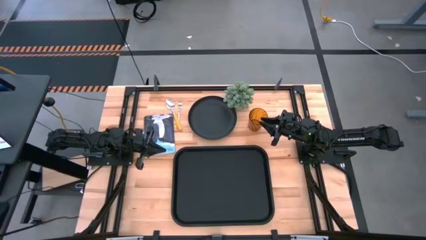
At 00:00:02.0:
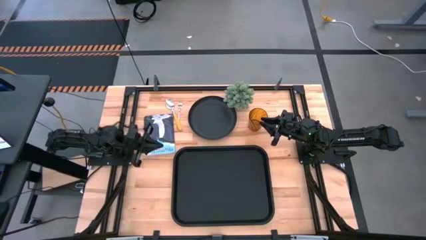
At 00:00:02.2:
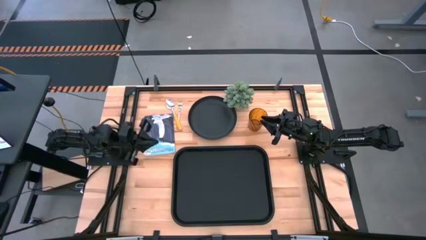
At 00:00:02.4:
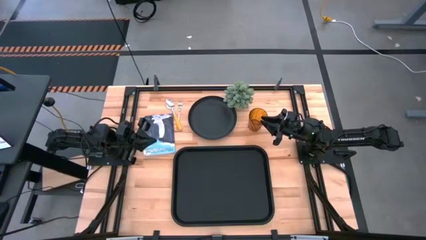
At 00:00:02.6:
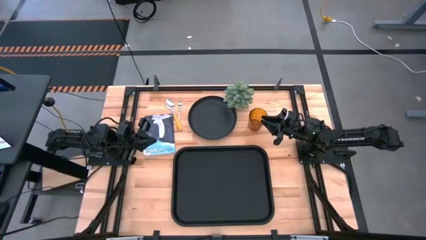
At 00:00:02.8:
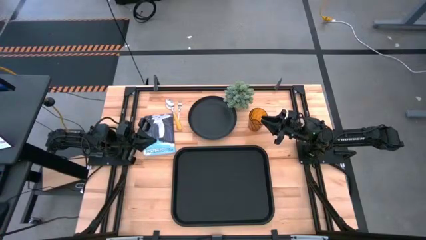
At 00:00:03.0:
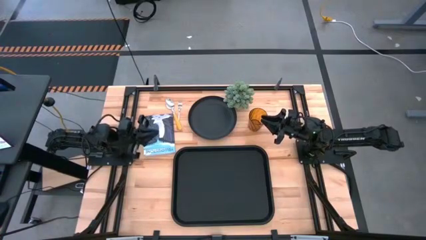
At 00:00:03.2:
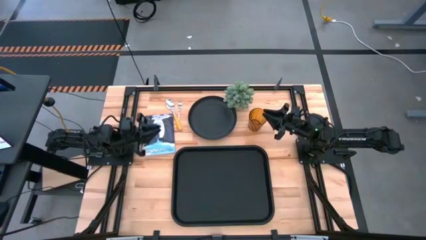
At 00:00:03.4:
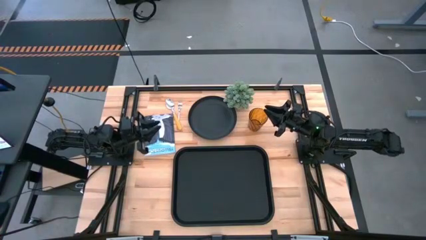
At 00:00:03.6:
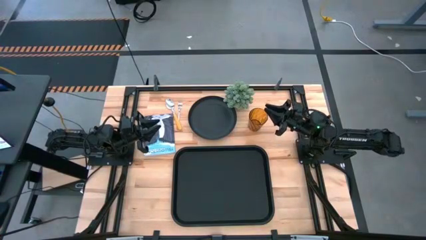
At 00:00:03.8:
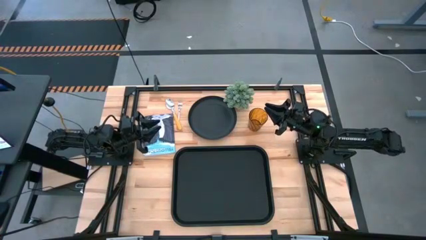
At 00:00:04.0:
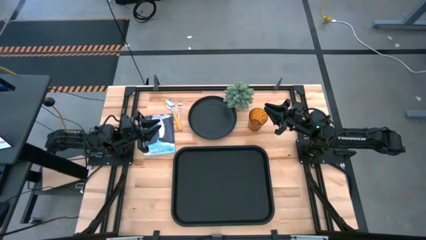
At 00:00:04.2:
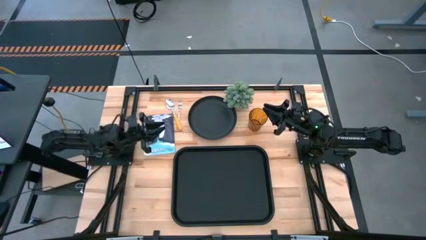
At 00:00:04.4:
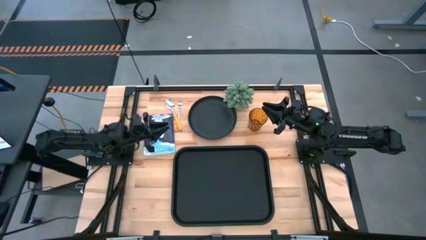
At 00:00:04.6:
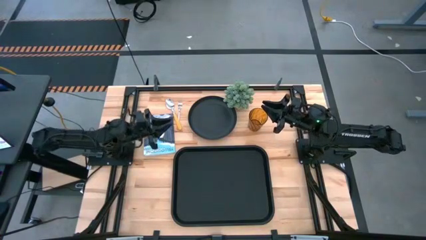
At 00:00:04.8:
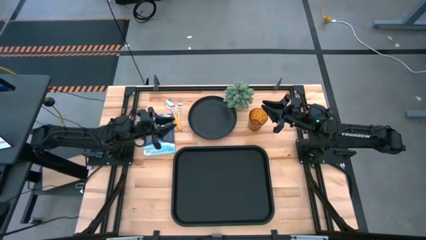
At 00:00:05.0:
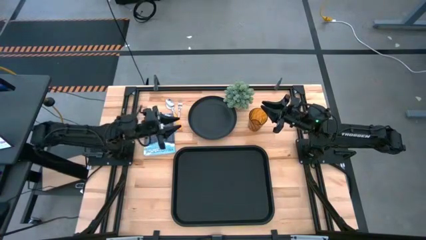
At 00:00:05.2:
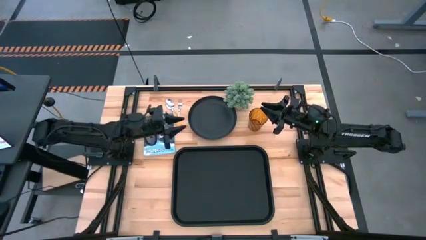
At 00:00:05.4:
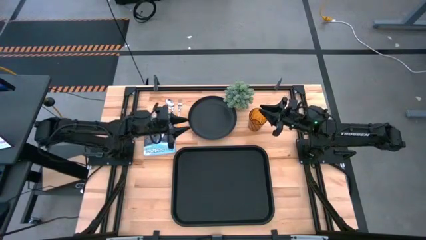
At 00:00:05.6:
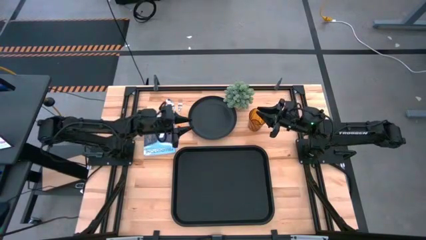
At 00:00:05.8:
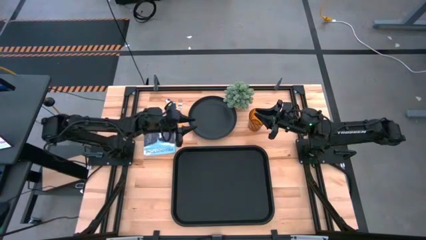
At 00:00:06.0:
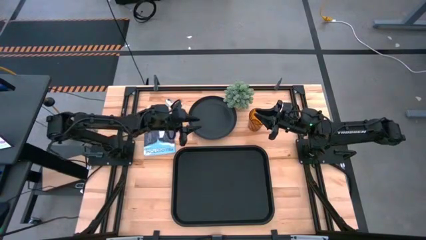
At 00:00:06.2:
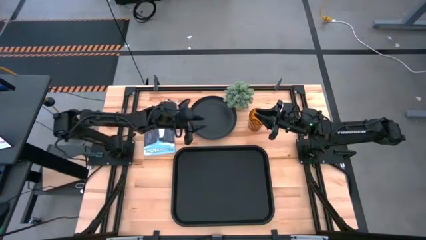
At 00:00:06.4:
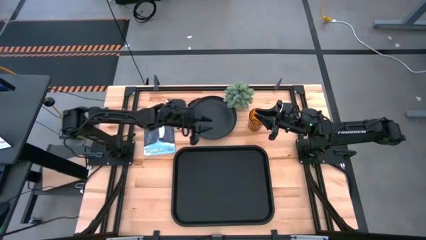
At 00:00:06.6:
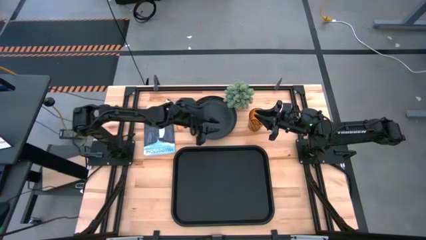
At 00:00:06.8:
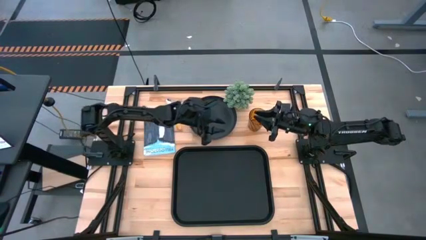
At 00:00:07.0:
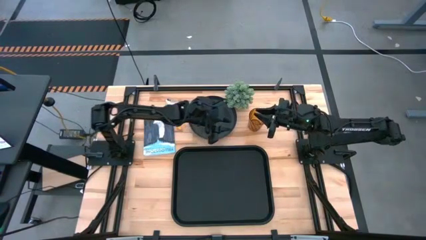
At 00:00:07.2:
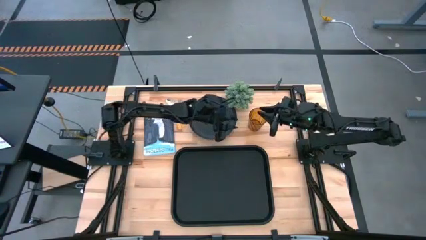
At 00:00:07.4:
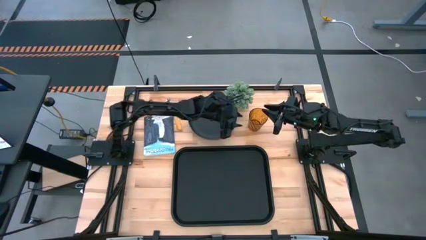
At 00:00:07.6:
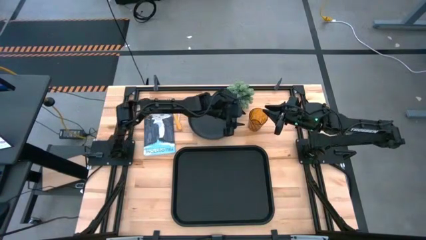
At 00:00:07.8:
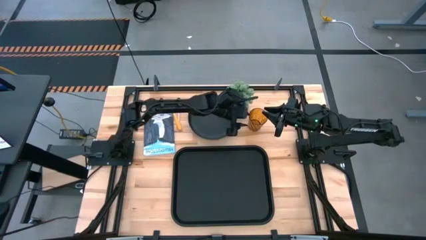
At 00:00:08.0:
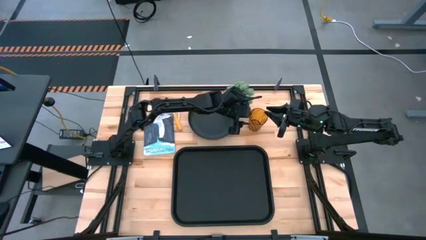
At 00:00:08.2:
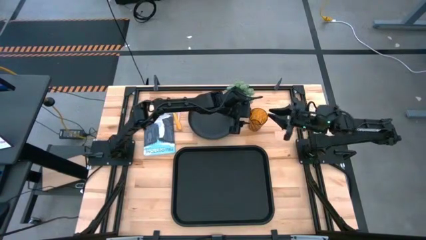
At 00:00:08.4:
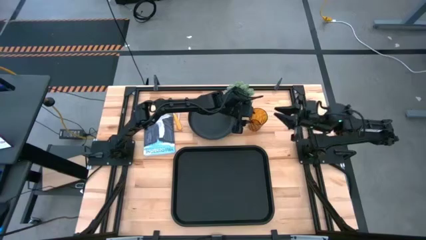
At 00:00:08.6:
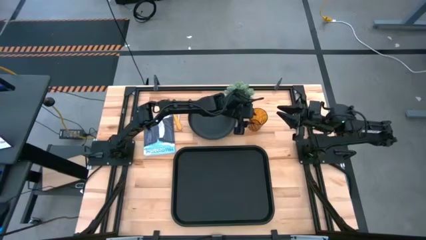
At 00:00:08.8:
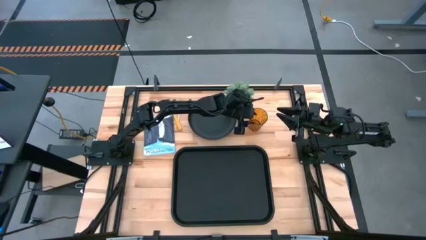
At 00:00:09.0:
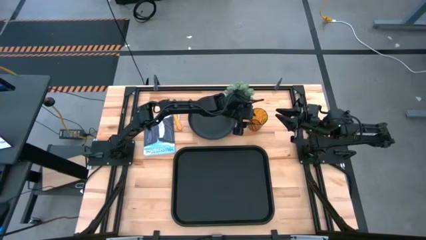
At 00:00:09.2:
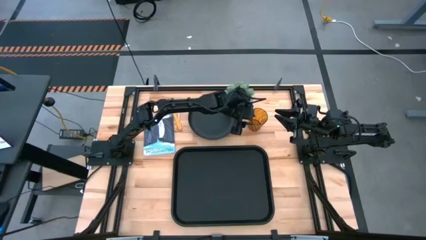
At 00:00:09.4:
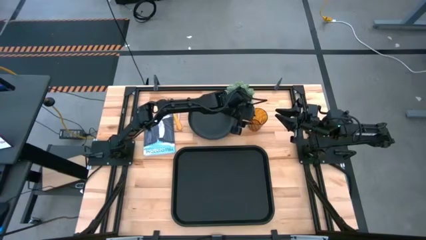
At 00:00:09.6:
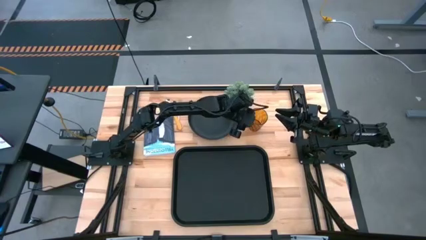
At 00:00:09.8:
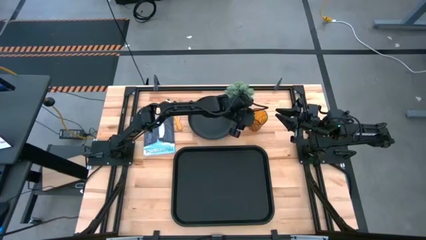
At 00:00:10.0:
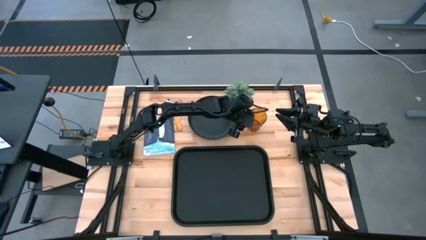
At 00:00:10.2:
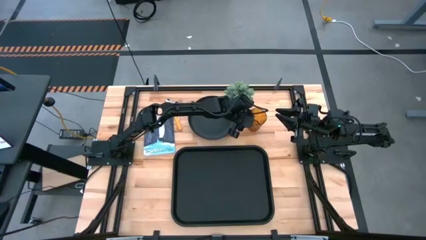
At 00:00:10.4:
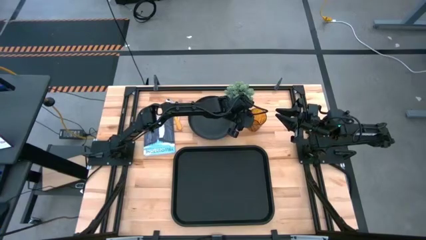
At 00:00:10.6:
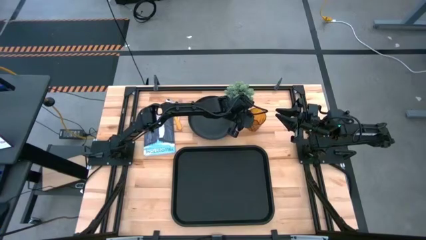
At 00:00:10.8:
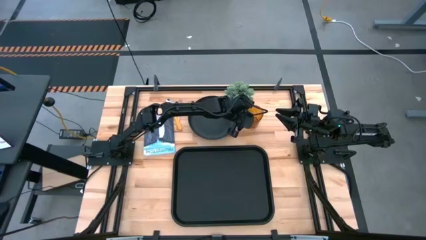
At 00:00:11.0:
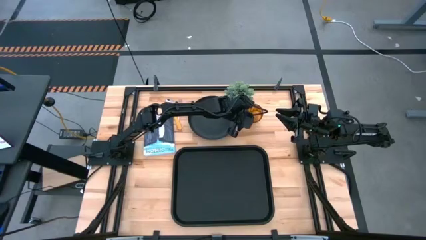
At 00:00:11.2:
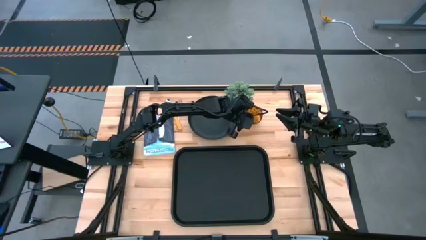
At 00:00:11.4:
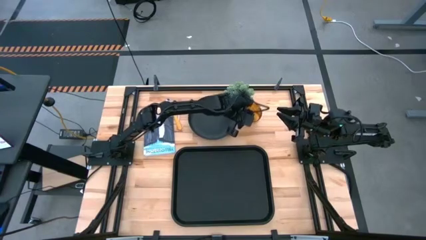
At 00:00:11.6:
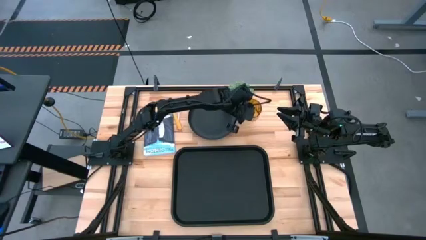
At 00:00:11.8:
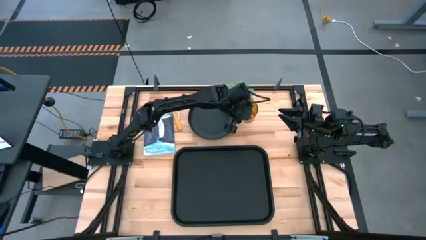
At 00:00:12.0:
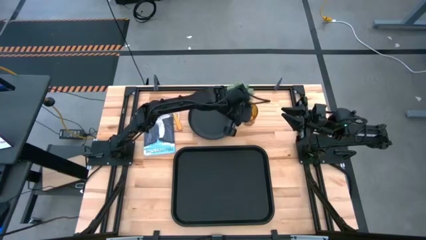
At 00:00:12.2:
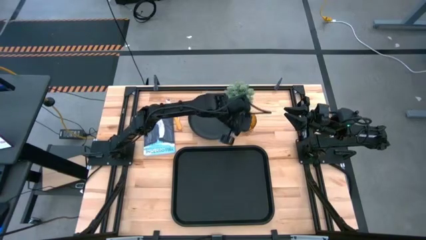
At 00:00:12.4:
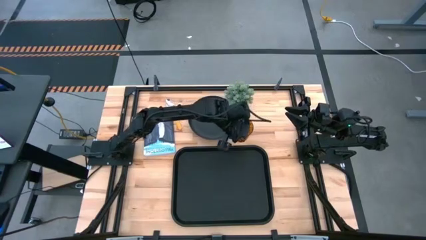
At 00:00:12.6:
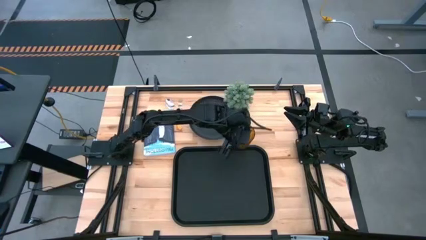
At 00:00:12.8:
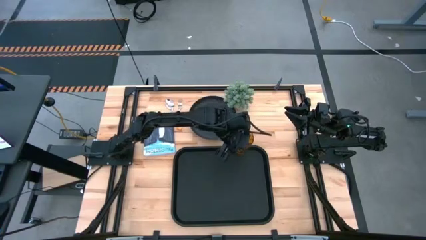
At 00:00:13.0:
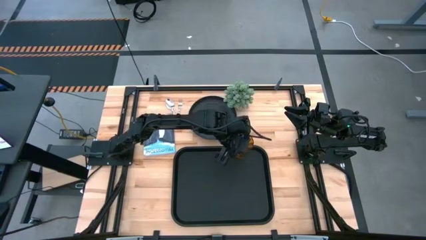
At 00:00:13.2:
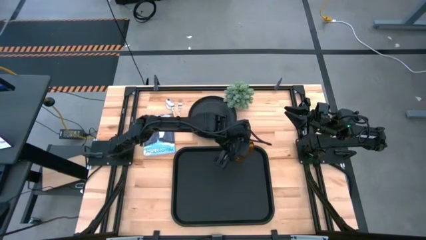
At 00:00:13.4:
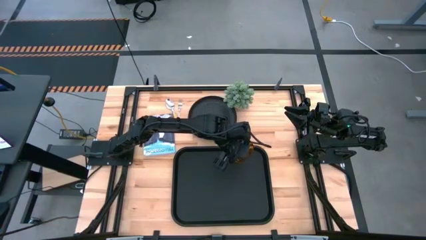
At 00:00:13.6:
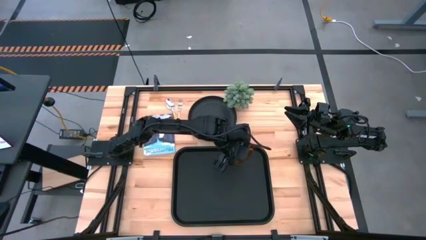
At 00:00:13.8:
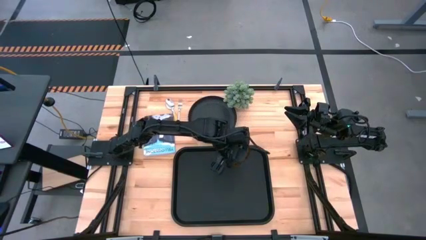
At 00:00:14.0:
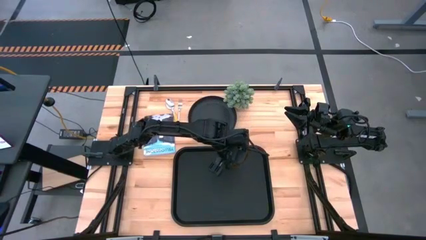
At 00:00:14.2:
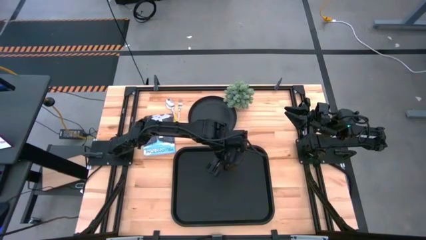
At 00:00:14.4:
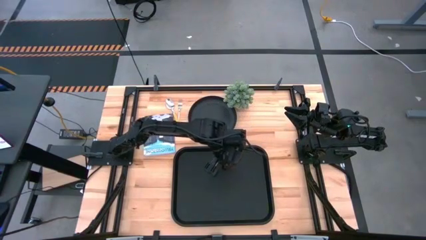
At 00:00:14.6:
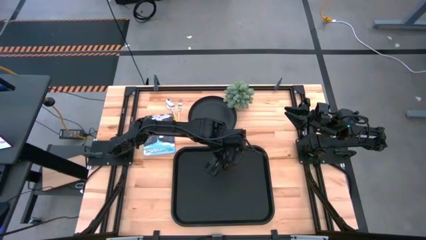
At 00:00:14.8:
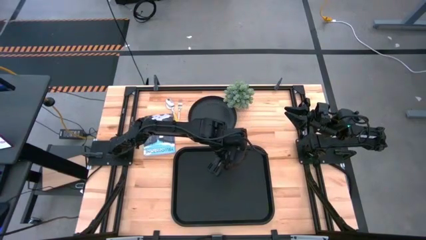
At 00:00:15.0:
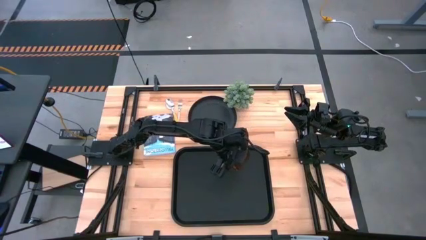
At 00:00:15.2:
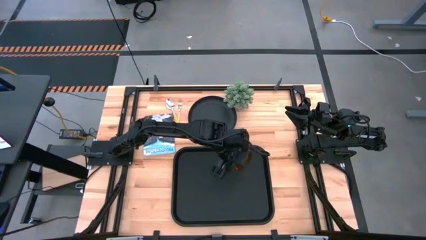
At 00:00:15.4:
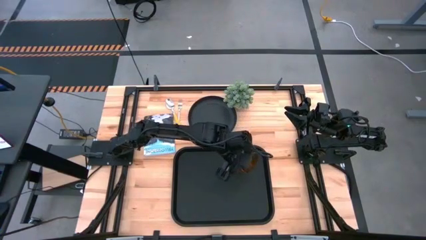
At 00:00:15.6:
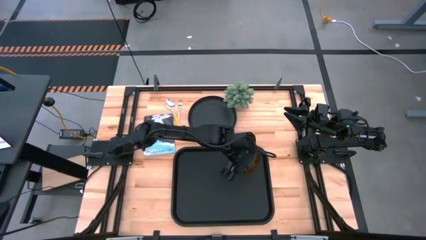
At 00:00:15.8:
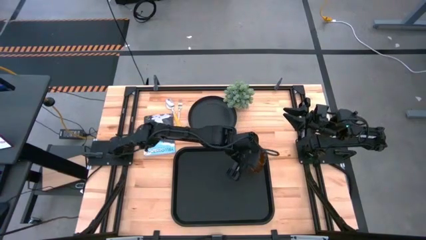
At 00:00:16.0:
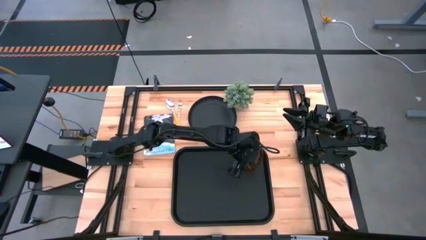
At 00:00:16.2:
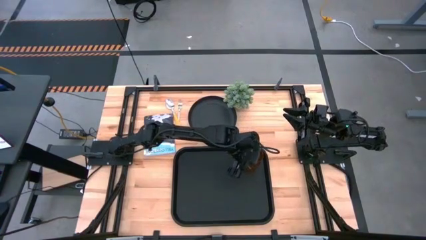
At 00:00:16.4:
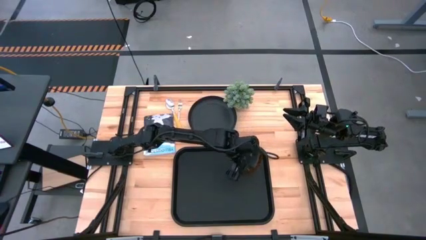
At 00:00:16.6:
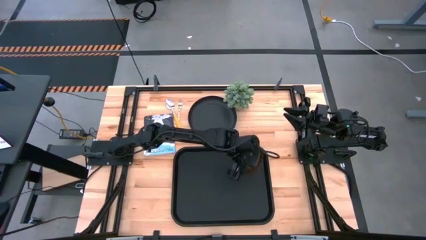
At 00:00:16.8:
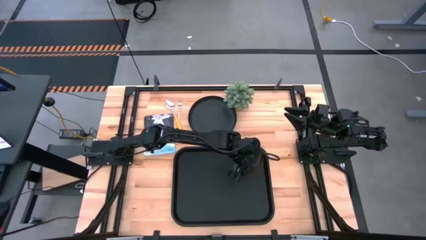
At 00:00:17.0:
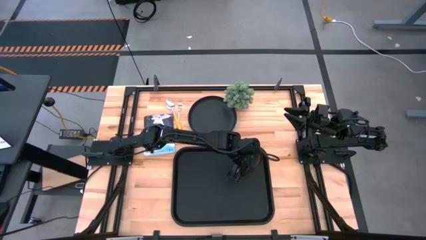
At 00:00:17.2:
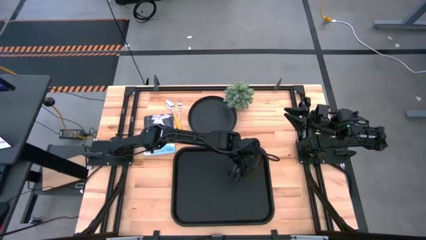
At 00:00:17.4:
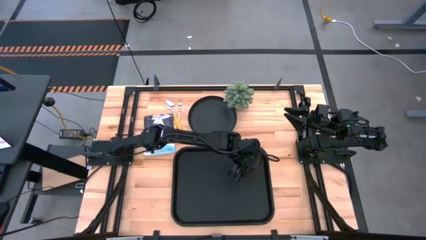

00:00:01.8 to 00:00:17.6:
Task: Pick and place plate/cup/fork/spoon on tray
Put the orange glass on the black tray
